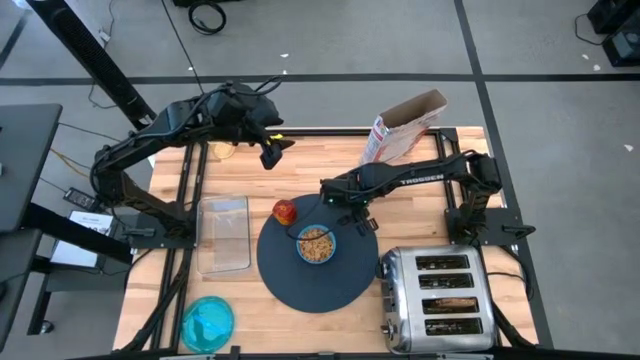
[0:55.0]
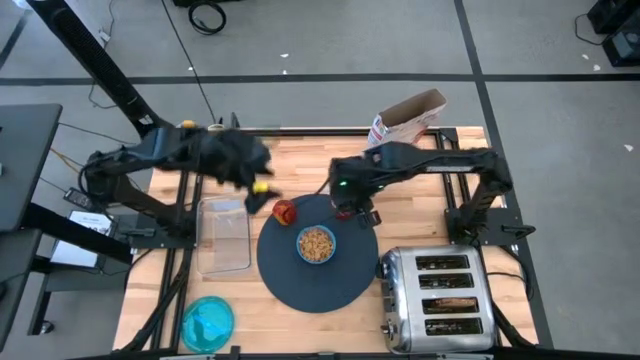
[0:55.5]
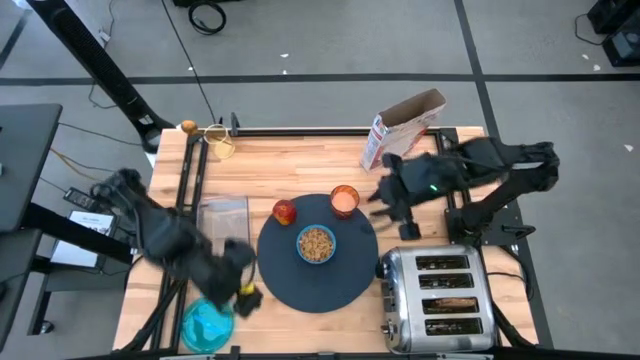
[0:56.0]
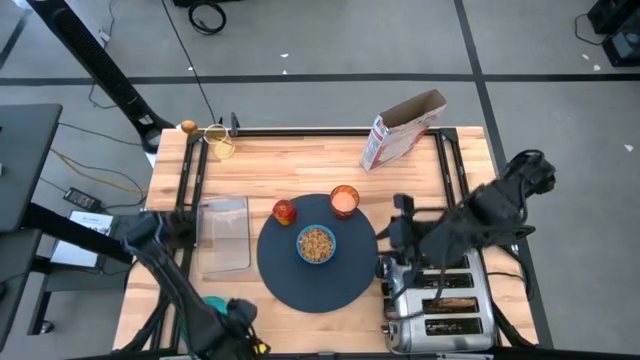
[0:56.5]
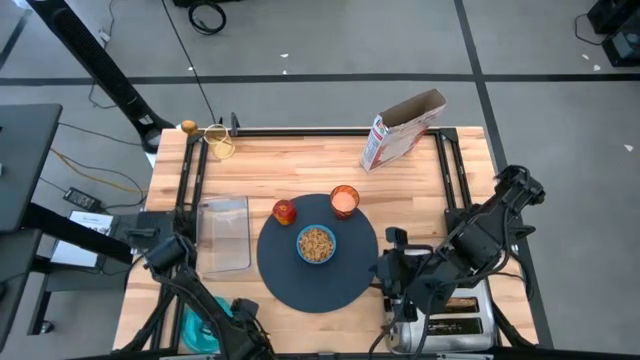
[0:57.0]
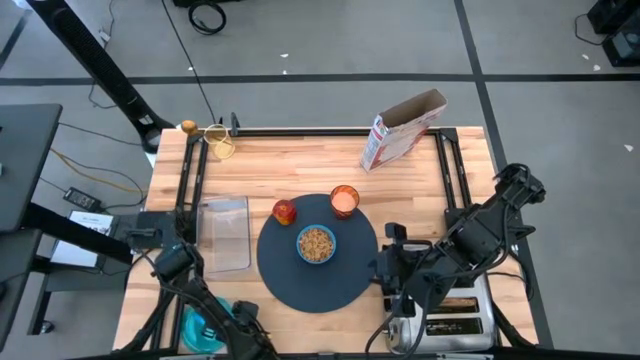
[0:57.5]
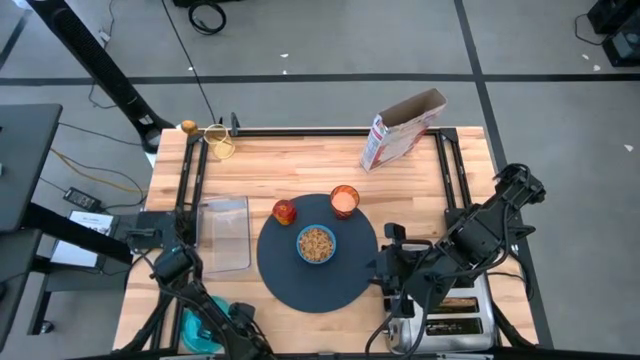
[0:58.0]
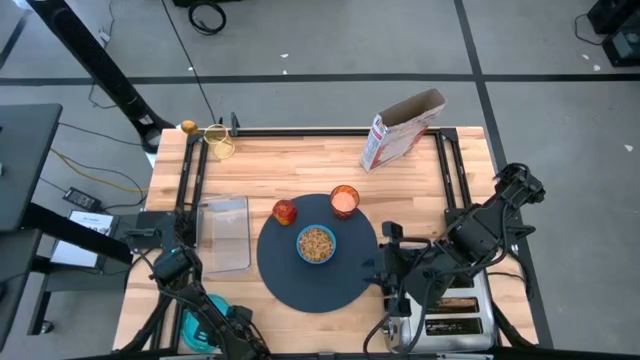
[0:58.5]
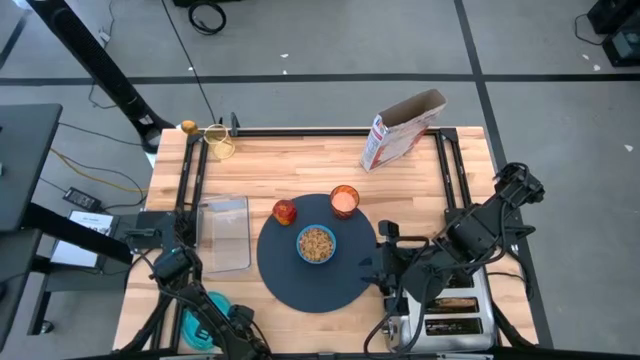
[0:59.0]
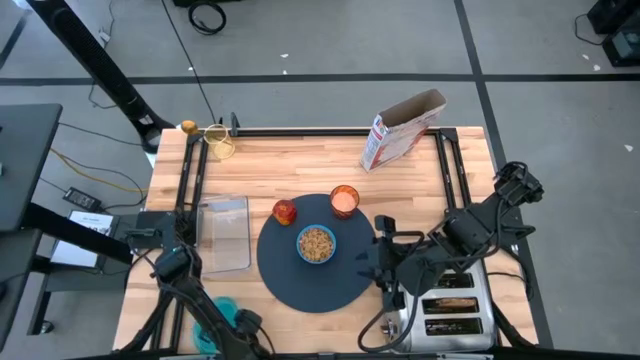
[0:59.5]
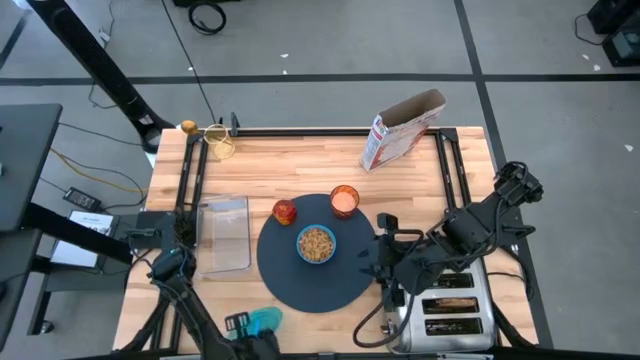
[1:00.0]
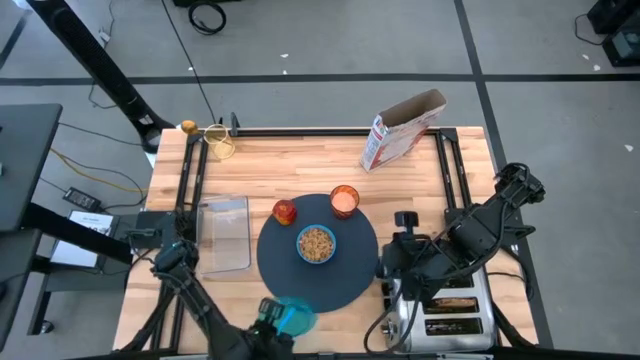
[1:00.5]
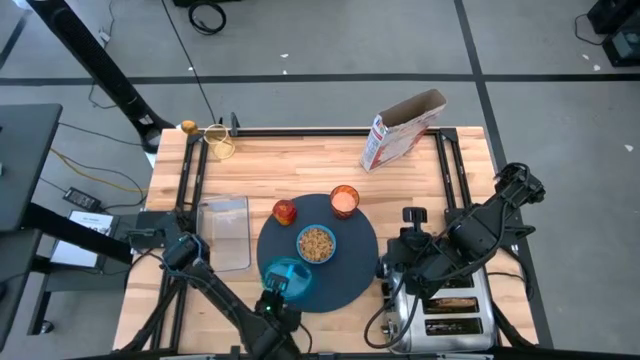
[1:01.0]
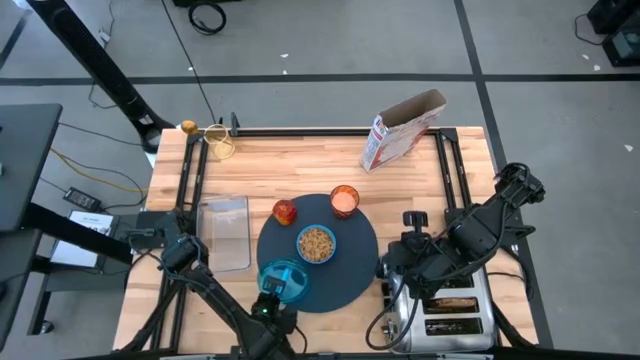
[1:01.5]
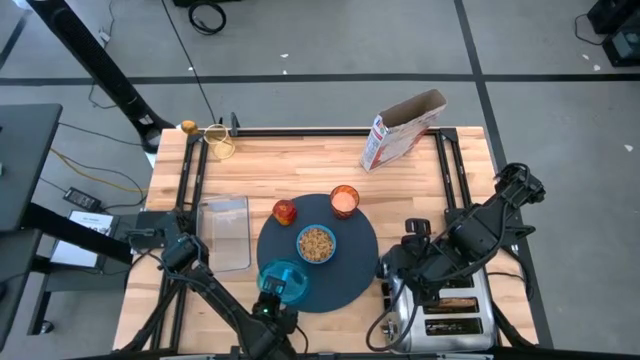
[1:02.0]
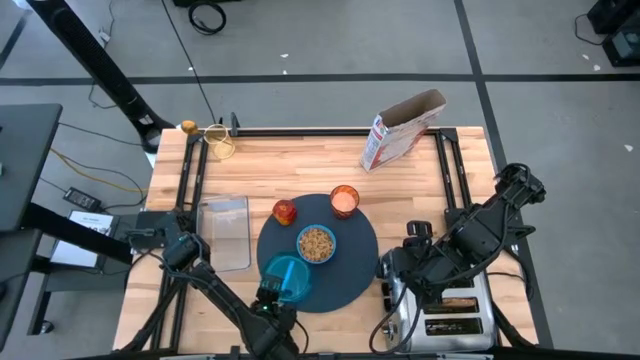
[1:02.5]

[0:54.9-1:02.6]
Task: Arrange a breakfast setting
Put the blue transparent plate on top of the dark blue placemat beside the blue bowl

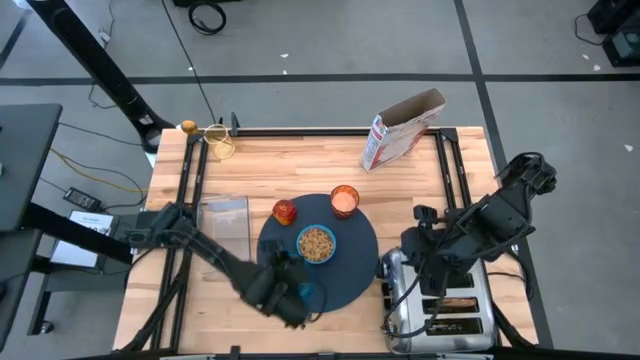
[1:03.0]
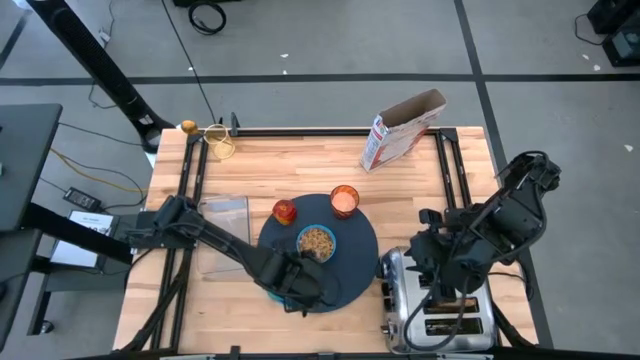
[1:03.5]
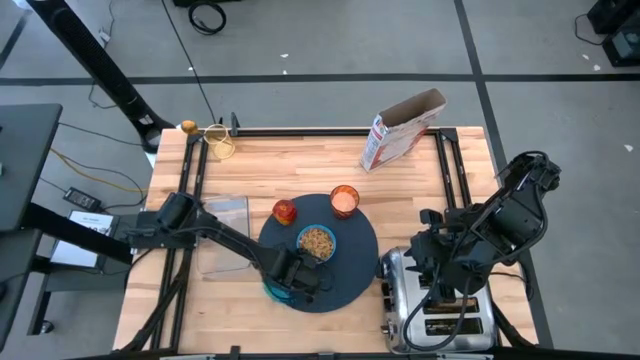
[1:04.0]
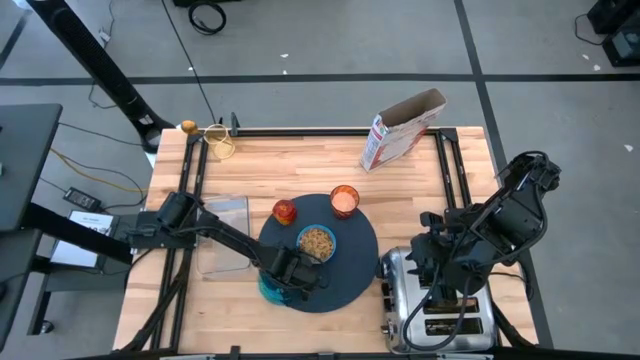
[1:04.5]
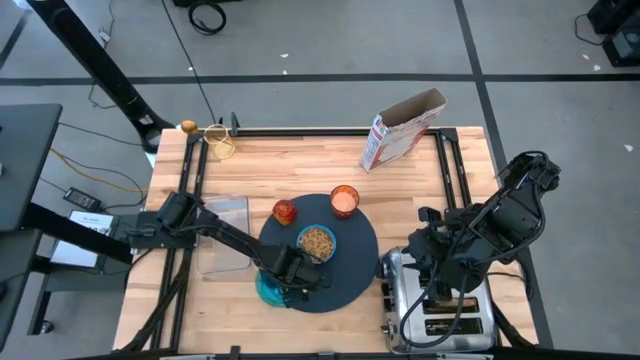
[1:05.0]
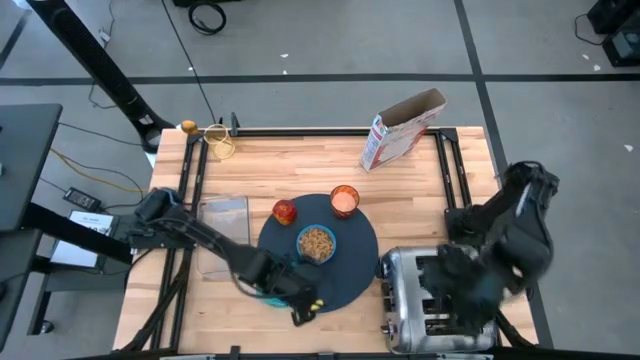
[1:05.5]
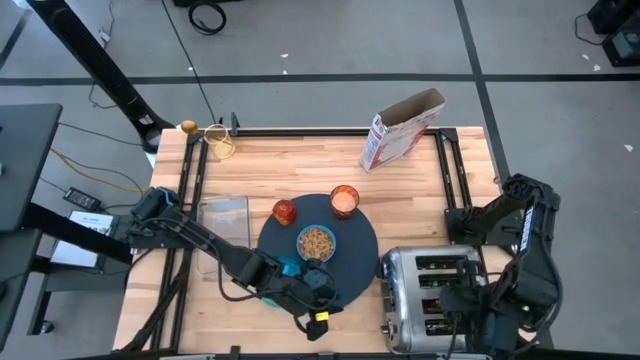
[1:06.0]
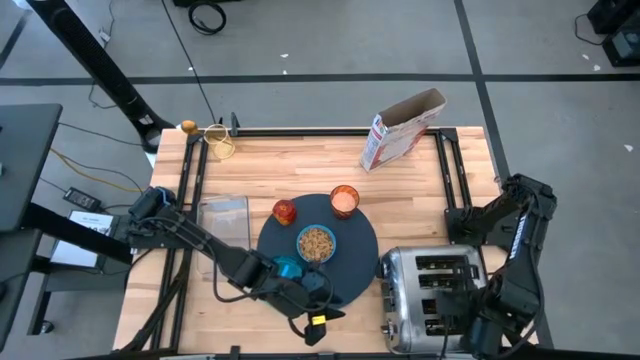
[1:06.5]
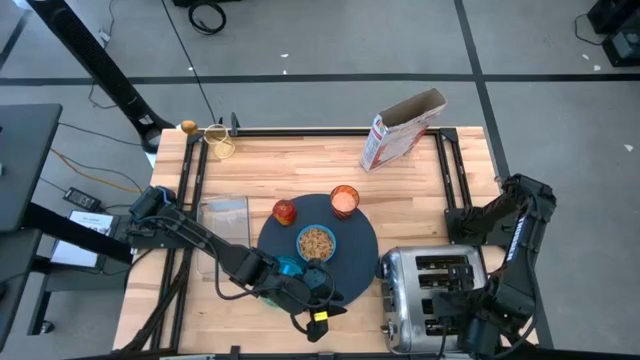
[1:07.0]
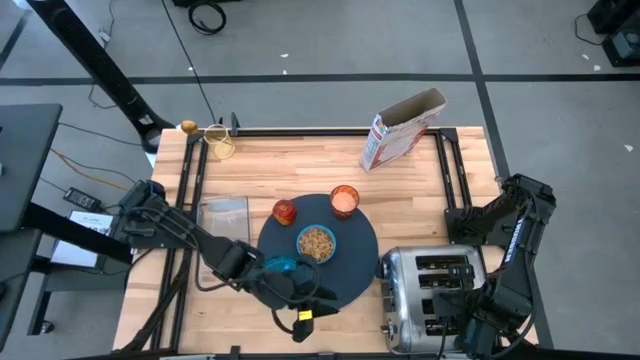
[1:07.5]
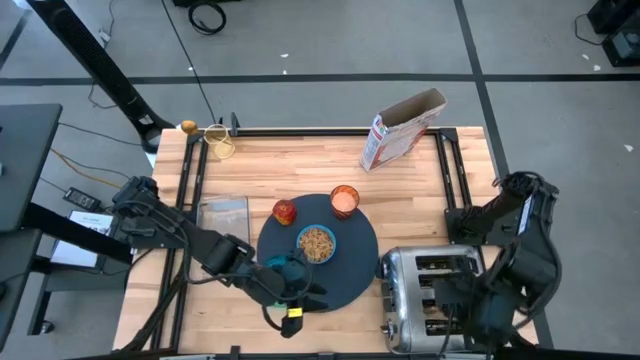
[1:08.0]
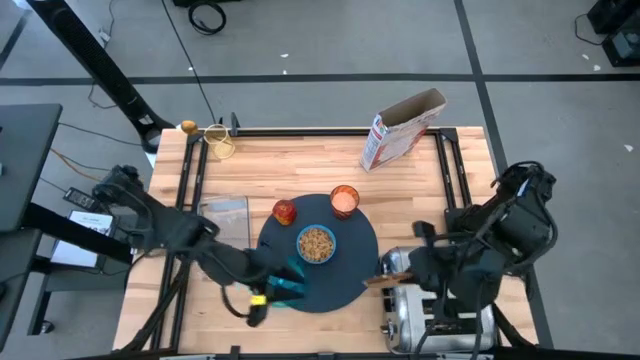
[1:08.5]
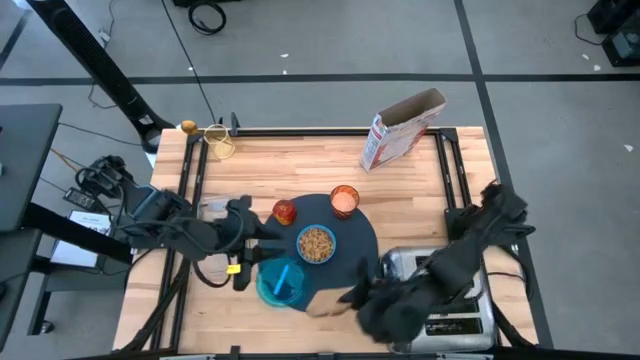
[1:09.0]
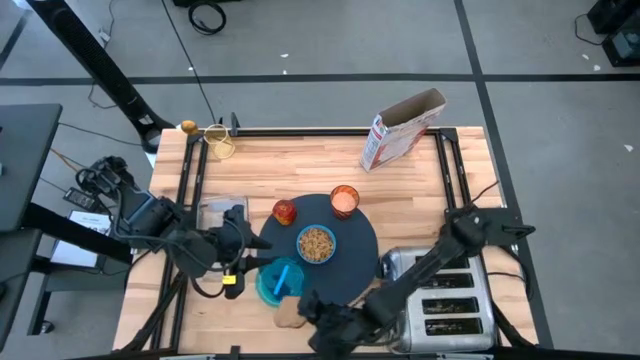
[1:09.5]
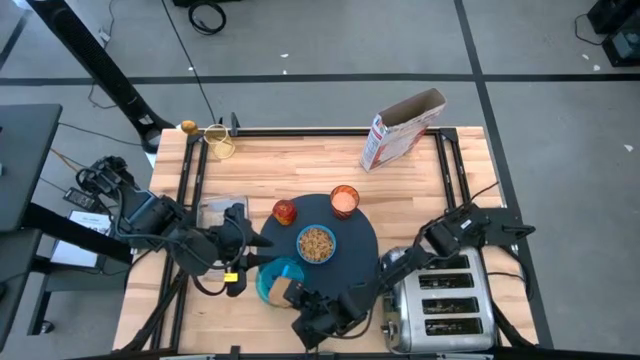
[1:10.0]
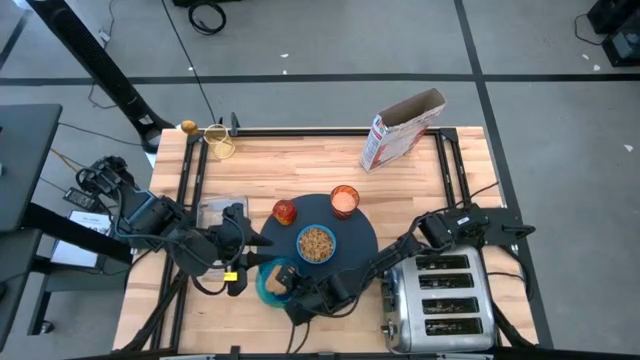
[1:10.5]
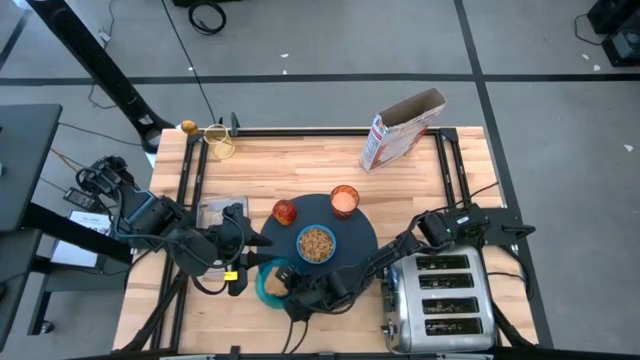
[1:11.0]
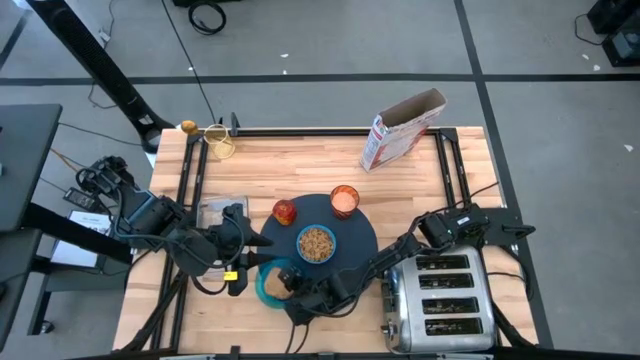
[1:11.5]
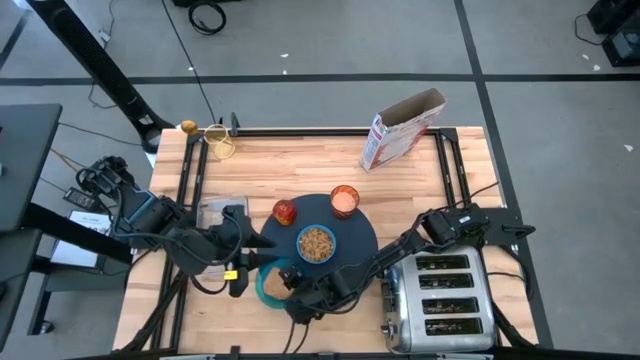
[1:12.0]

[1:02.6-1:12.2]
Put the bread on top of the blue transparent plate

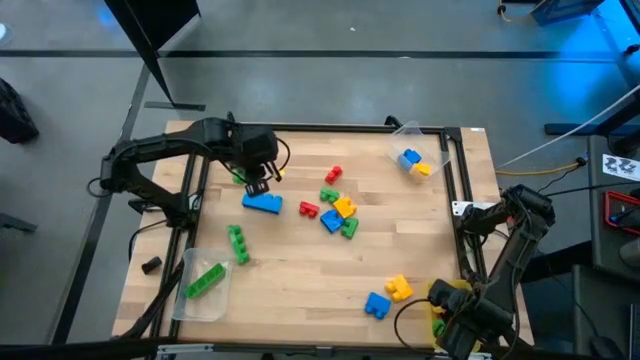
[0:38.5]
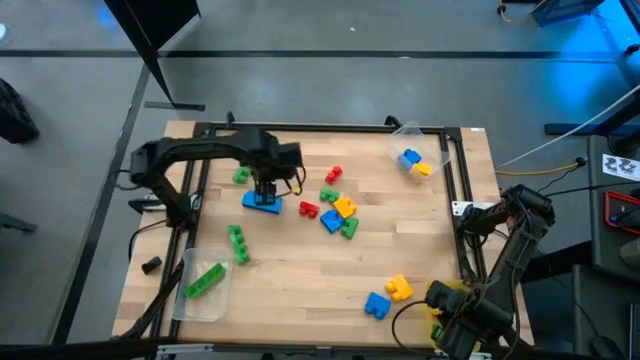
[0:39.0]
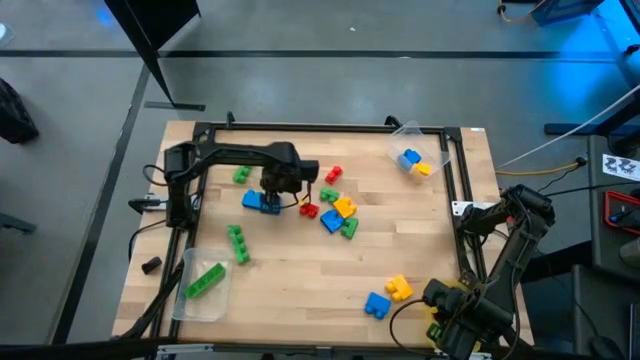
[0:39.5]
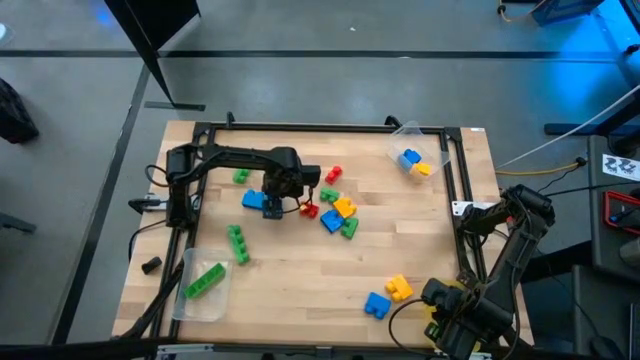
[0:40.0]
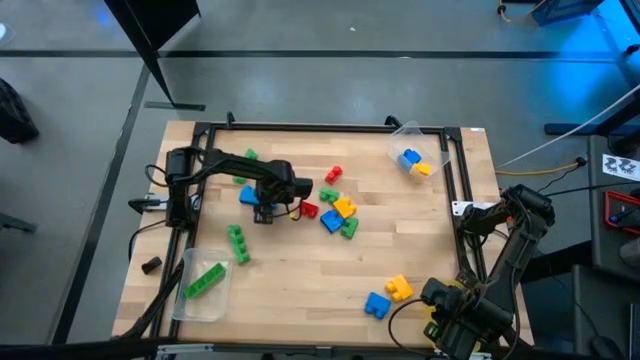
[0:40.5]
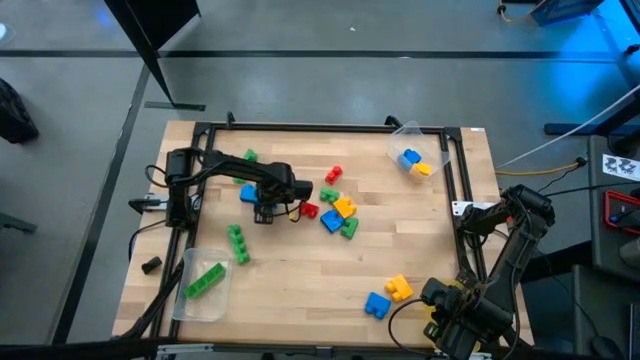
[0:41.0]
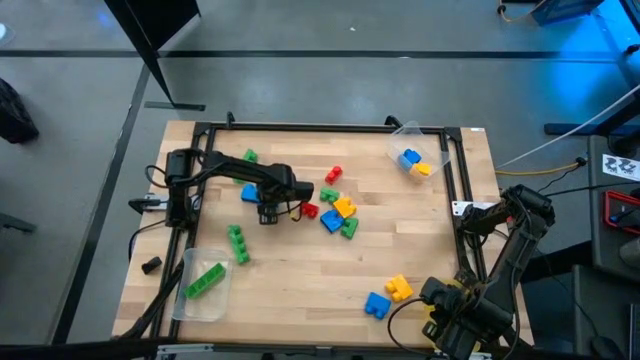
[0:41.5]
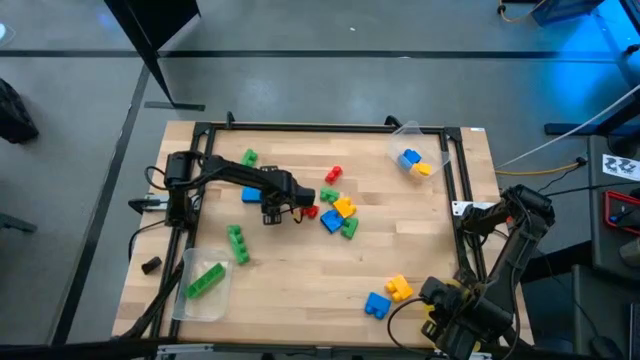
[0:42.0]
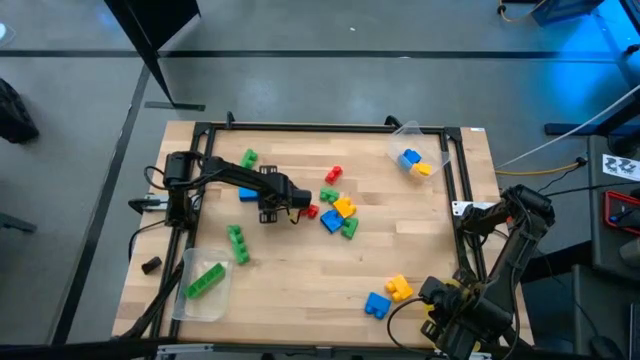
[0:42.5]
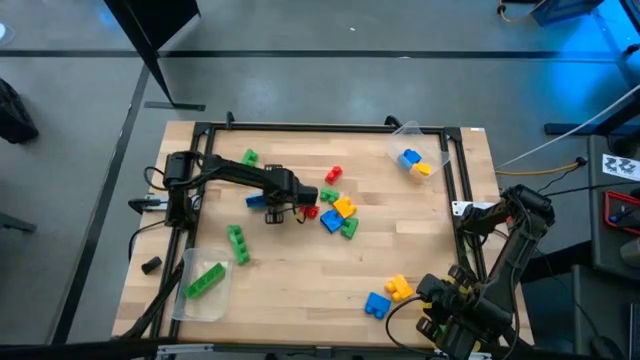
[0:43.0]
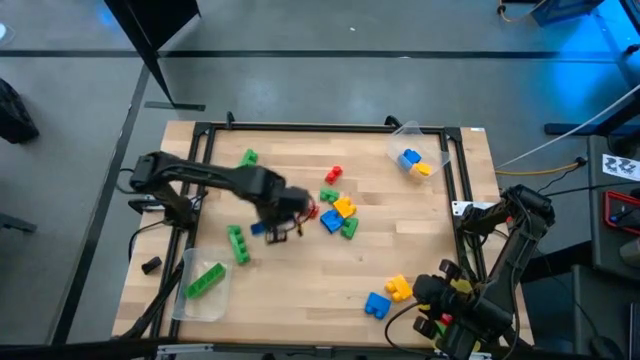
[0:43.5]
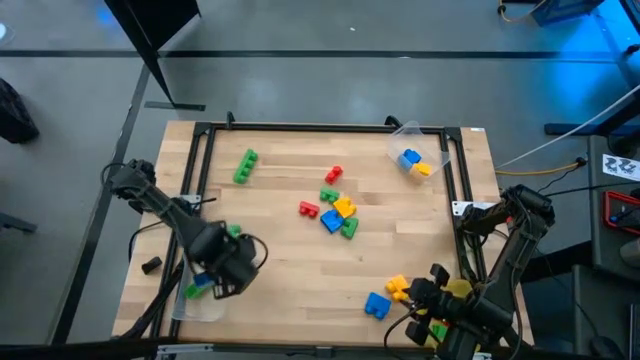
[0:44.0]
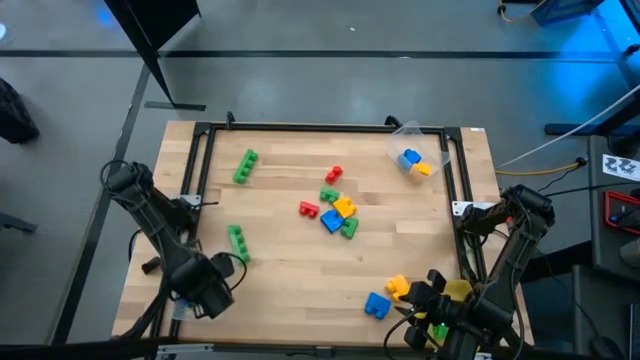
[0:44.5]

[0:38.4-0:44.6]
Task: Sort blocks by size
Put the 4 stud blue game piece into the bottom transparent bin
